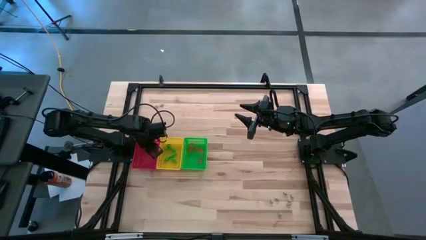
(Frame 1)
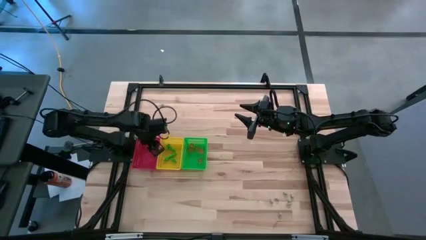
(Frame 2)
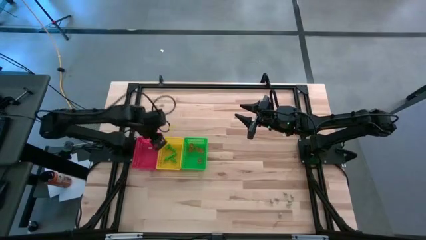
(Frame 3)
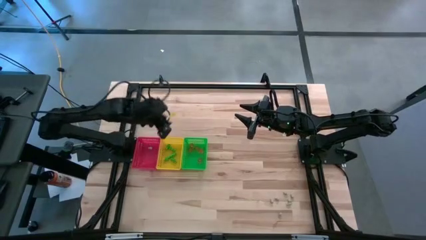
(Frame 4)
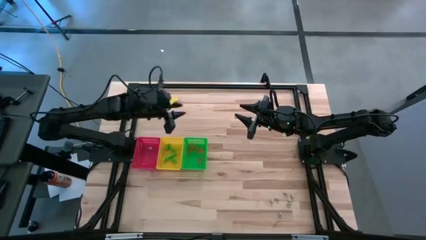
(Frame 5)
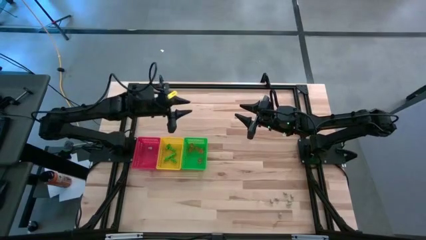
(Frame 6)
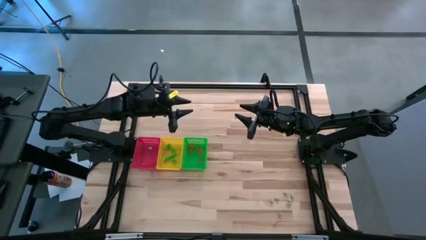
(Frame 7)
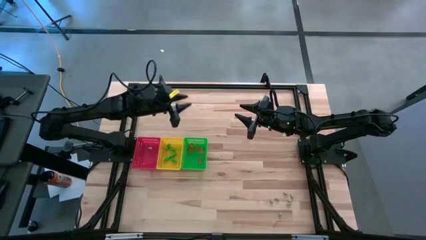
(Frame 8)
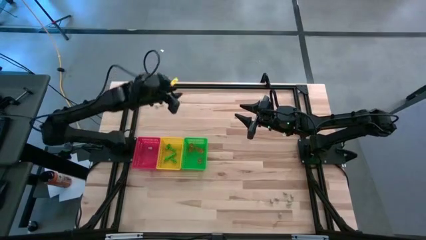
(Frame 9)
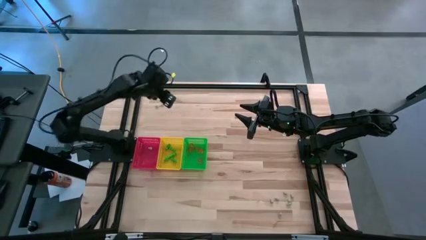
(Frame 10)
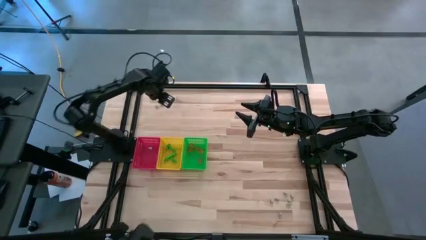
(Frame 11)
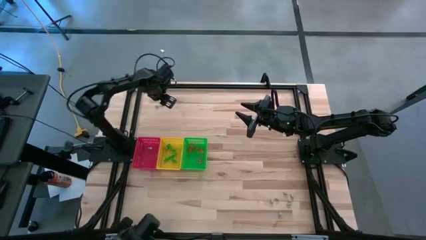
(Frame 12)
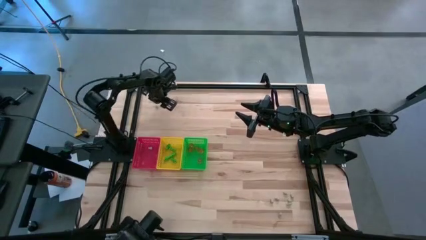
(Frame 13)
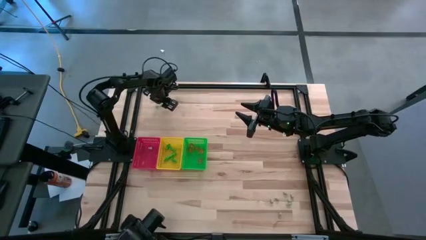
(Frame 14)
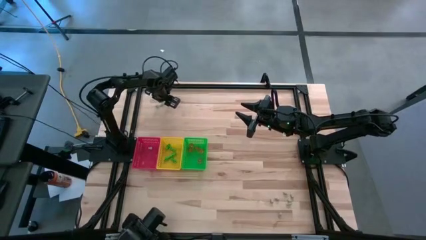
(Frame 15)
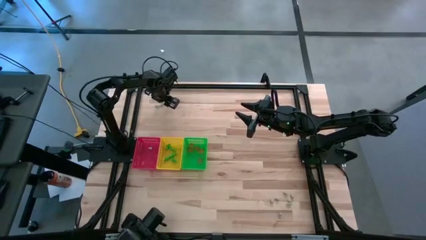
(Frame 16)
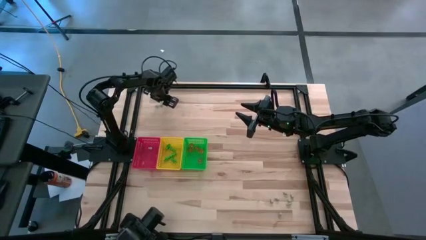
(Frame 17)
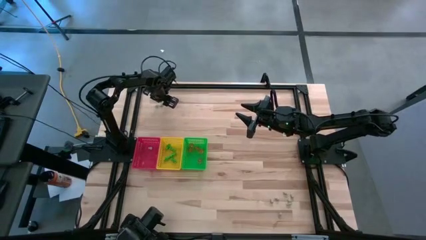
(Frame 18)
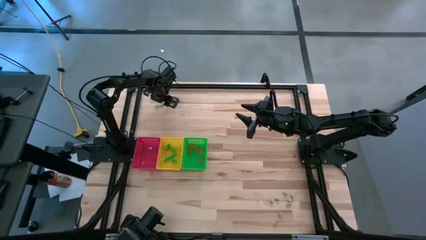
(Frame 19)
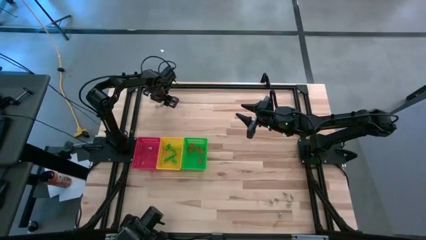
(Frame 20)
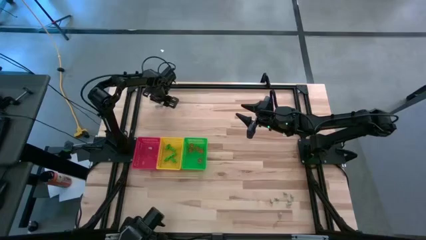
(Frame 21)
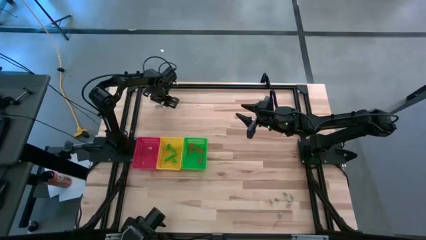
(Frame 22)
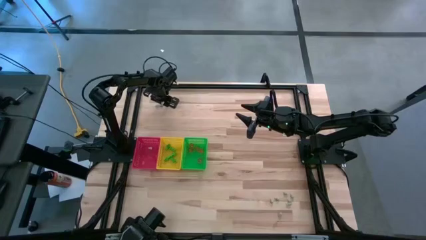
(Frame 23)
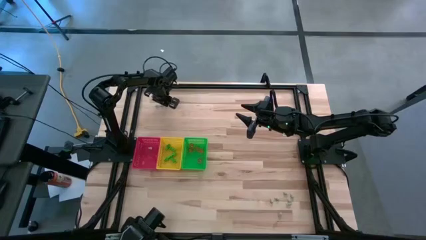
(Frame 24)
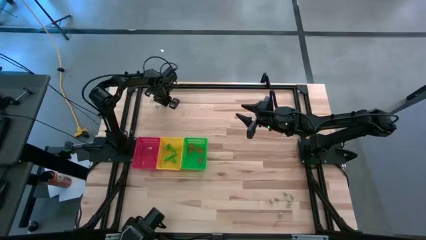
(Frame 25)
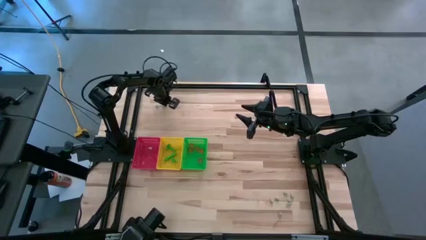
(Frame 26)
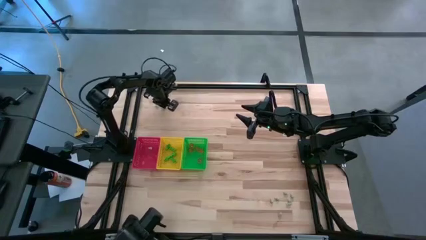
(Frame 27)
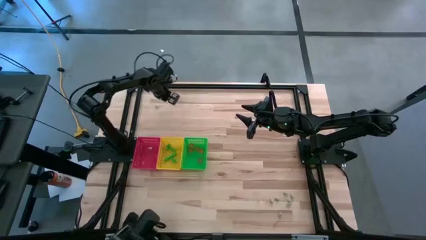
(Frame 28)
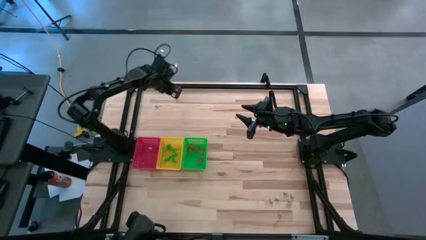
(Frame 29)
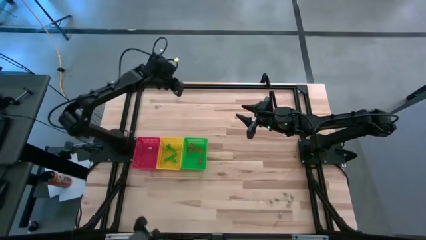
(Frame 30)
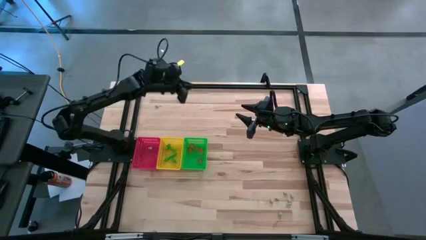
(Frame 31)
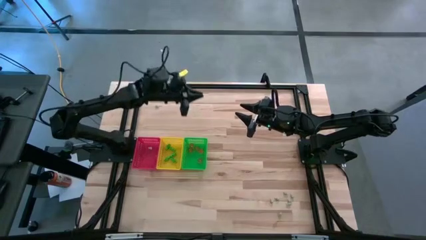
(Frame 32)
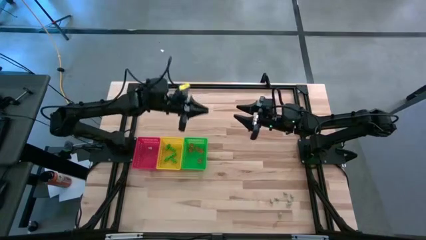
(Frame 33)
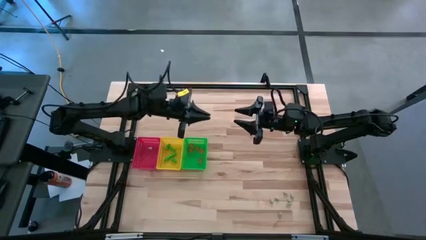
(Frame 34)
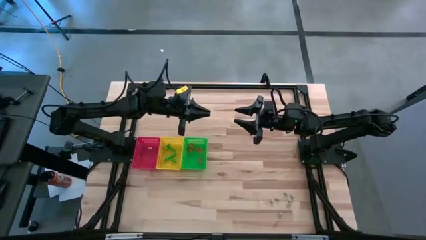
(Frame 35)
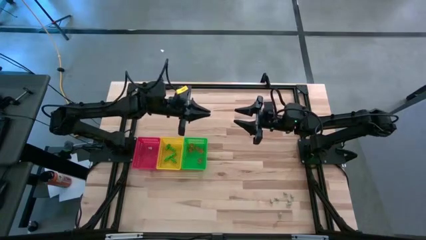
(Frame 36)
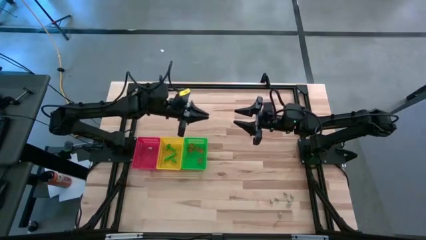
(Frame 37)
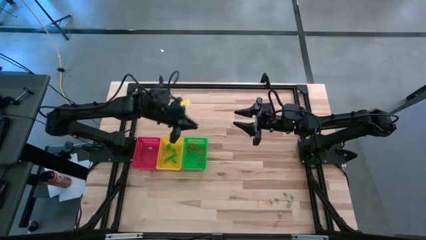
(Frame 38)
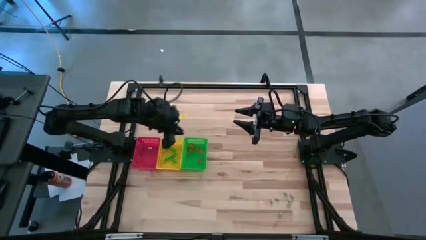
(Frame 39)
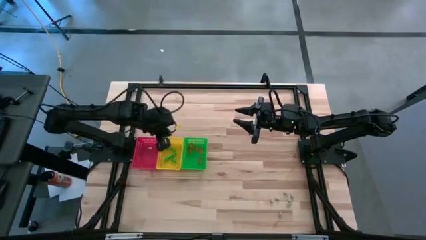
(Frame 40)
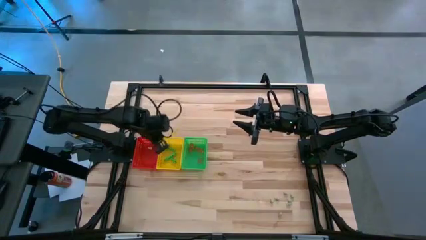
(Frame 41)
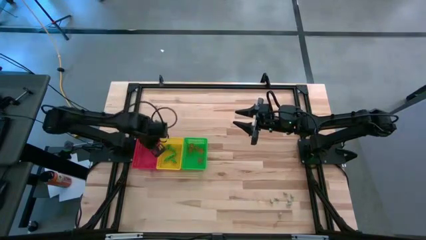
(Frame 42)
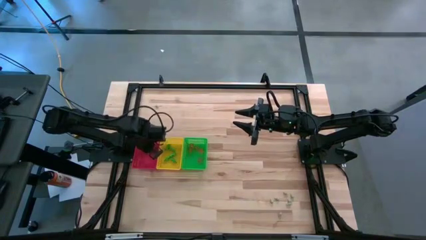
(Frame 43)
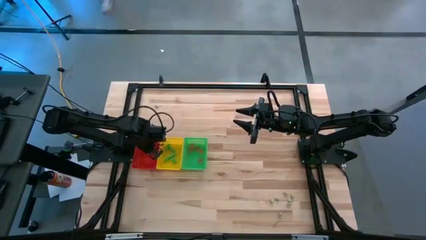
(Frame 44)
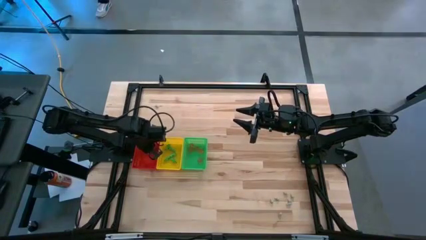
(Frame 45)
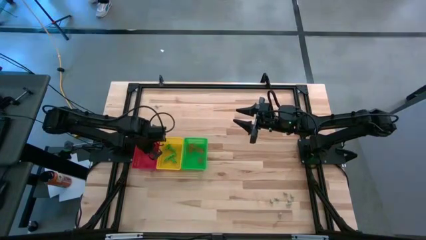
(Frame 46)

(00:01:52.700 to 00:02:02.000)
Task: Sort Halloween decoration
Put the white skull toy into the red bin

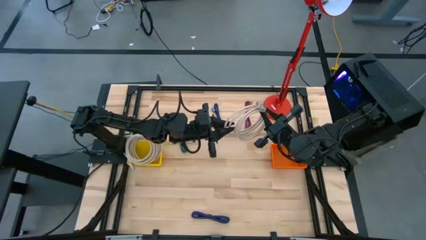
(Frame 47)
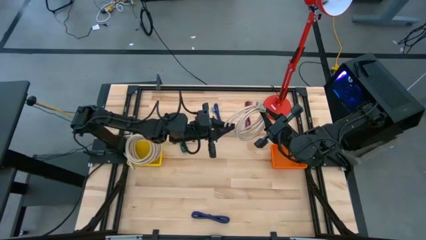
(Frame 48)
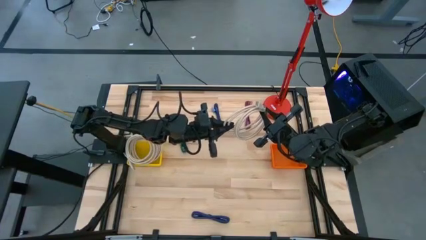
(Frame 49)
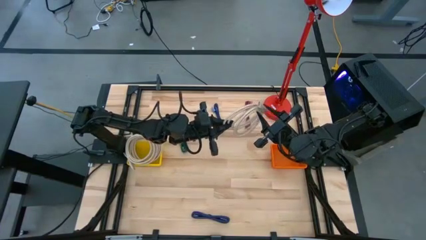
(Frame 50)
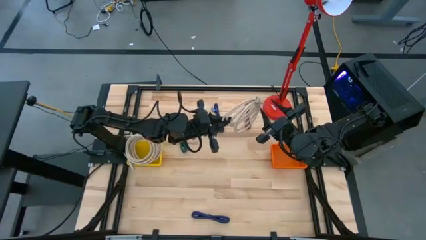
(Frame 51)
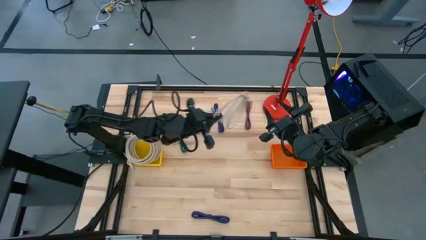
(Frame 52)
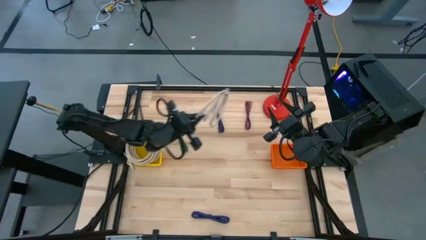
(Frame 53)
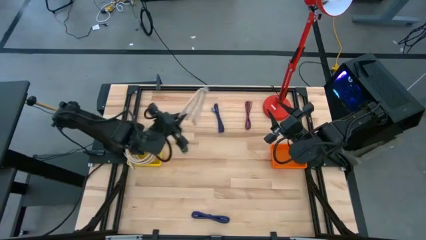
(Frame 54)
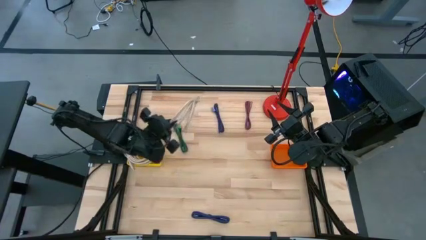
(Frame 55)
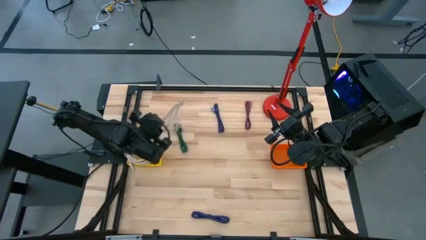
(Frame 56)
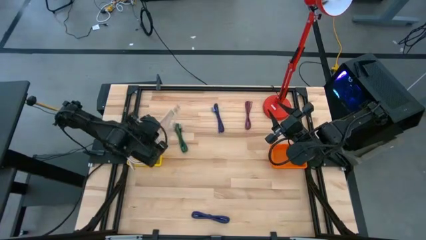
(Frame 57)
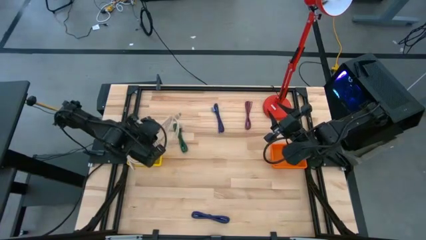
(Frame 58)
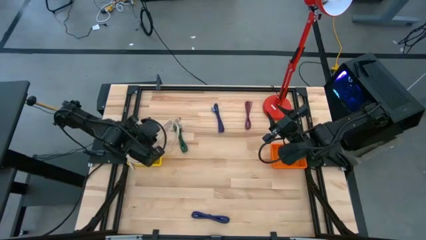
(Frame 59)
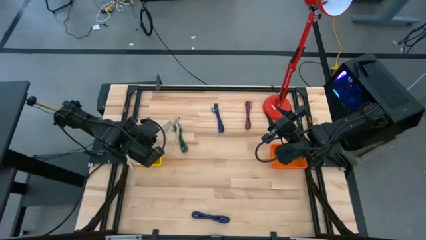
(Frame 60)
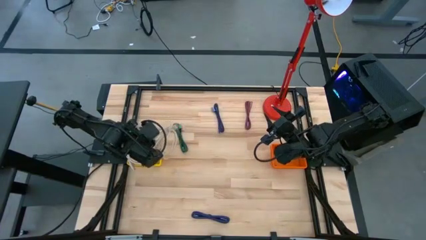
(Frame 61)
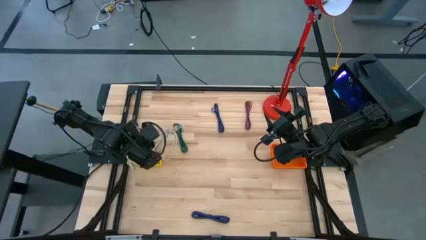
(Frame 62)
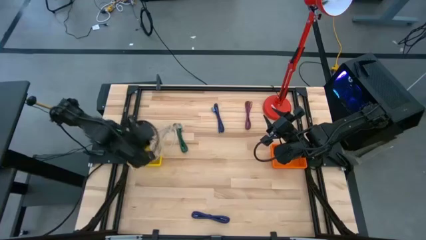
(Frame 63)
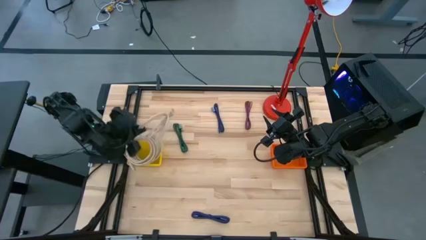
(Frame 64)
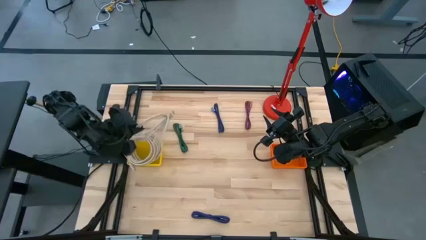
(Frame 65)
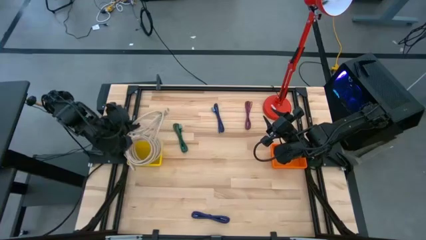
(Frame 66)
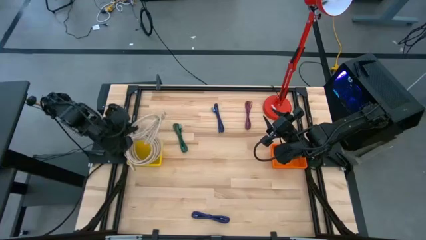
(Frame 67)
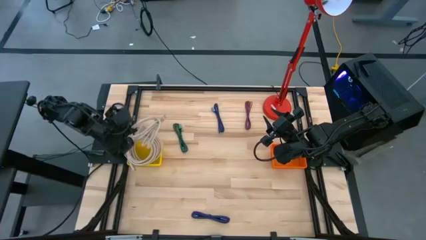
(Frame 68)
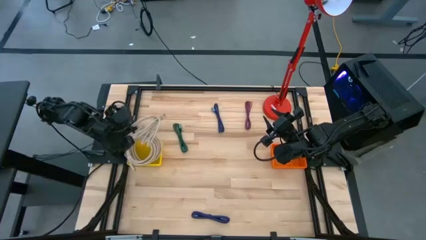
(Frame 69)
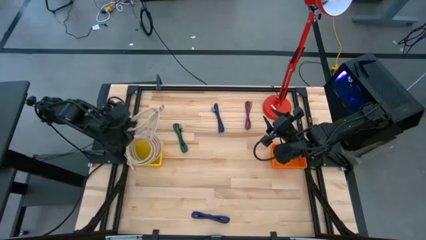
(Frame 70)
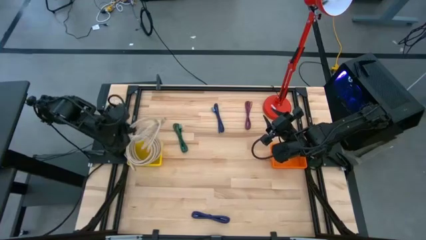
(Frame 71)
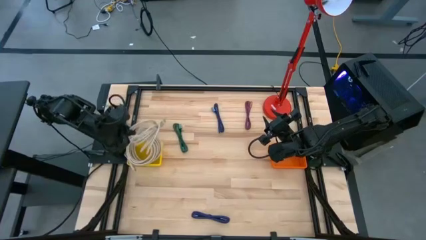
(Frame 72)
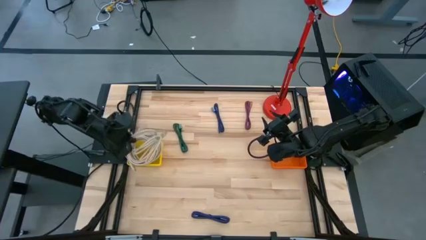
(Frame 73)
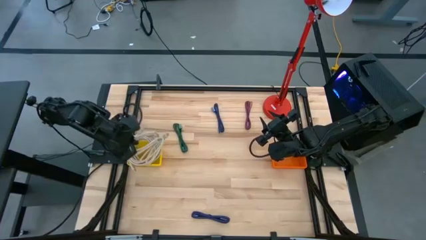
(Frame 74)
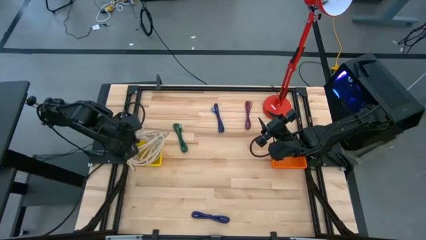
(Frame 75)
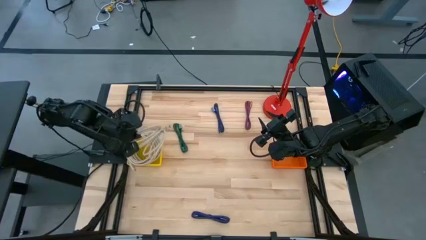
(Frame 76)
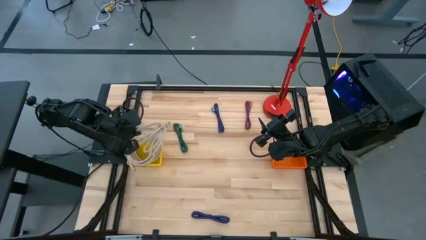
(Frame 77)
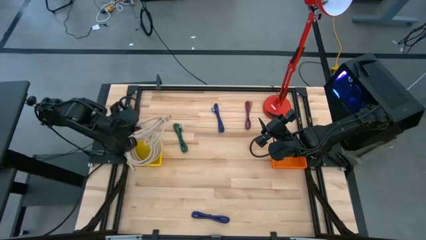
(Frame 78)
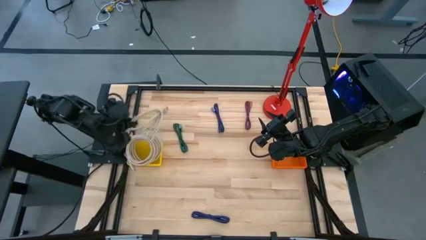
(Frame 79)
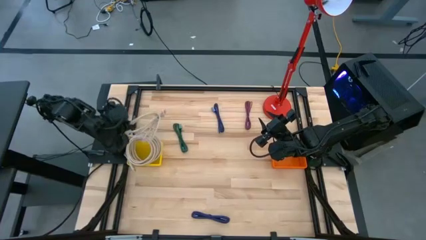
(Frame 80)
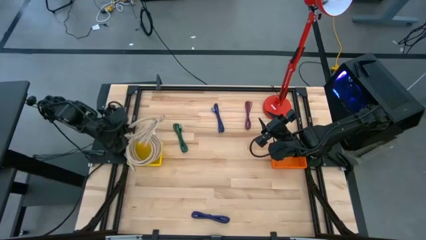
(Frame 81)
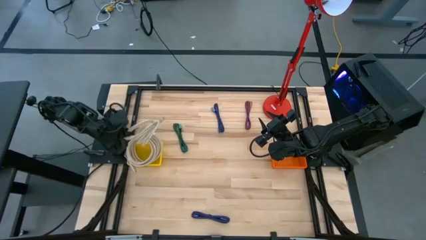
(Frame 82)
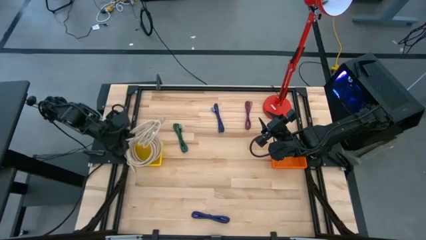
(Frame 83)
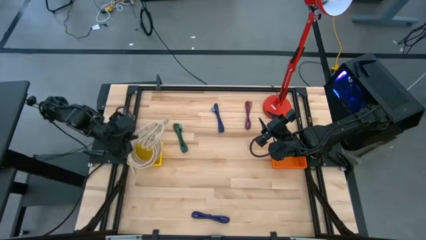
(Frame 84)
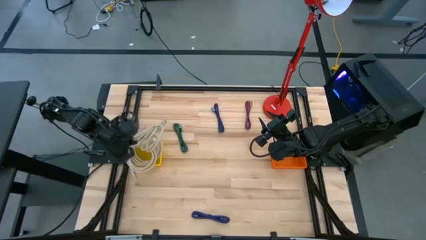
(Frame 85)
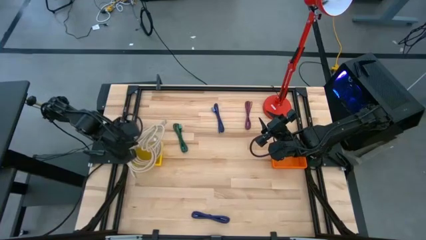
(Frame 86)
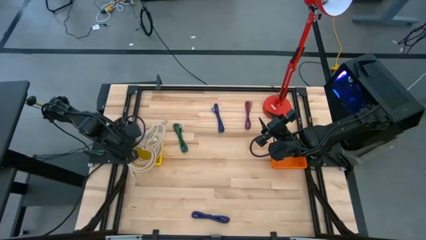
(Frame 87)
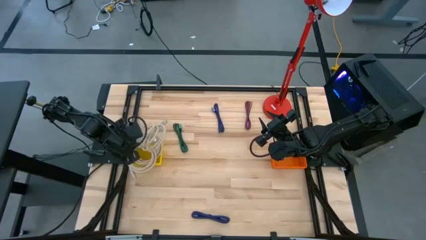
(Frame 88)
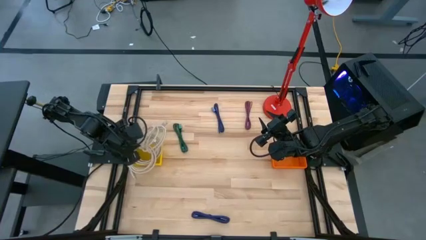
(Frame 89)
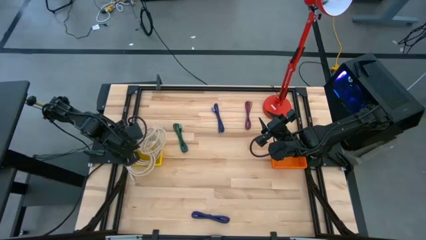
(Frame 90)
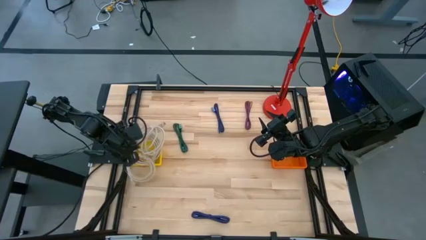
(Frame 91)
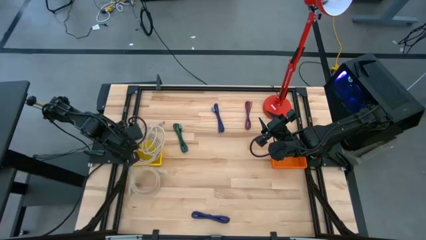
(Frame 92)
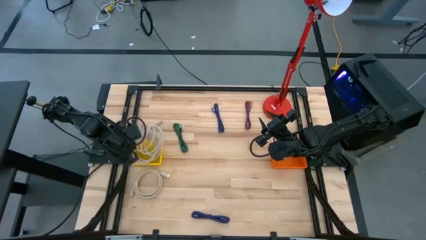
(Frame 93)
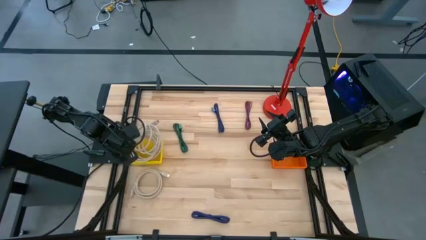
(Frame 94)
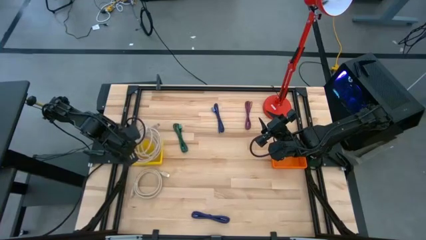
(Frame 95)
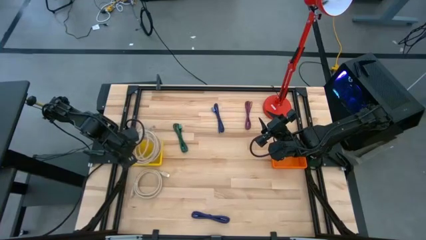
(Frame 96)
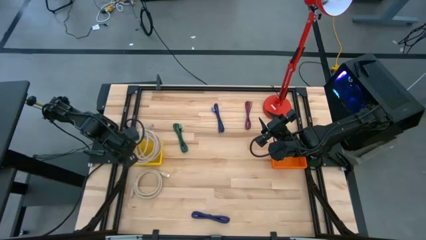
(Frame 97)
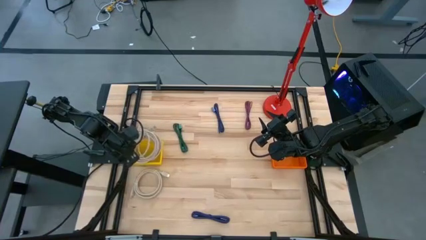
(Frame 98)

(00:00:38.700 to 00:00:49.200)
Task: Pick & Place USB Port
Put the brown HDMI cable into the yellow basket
